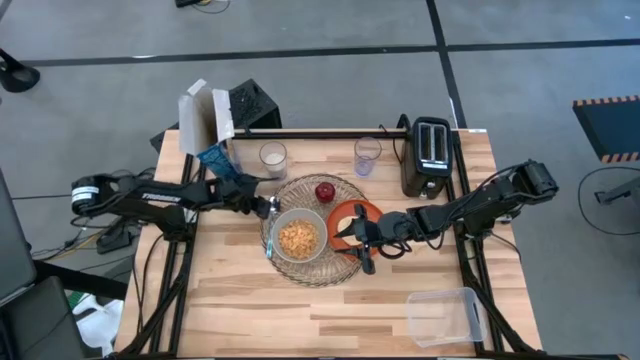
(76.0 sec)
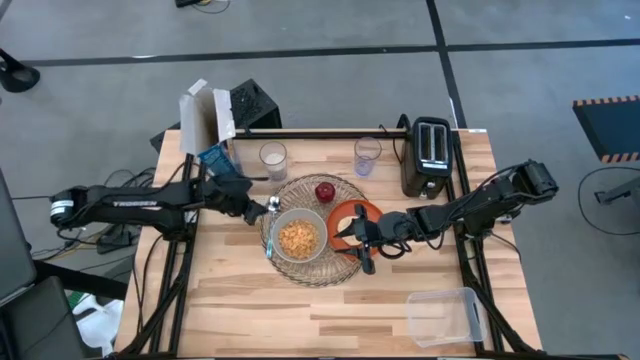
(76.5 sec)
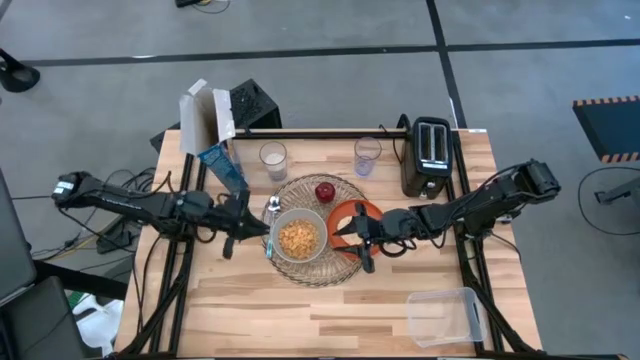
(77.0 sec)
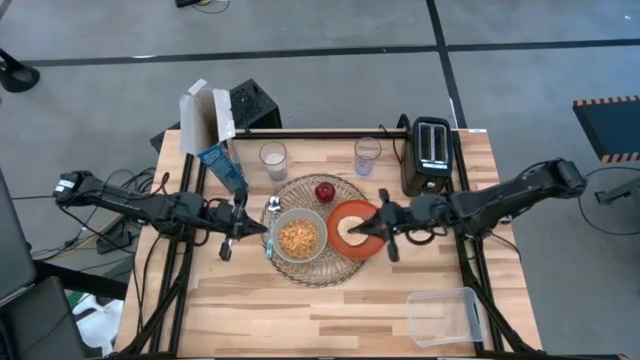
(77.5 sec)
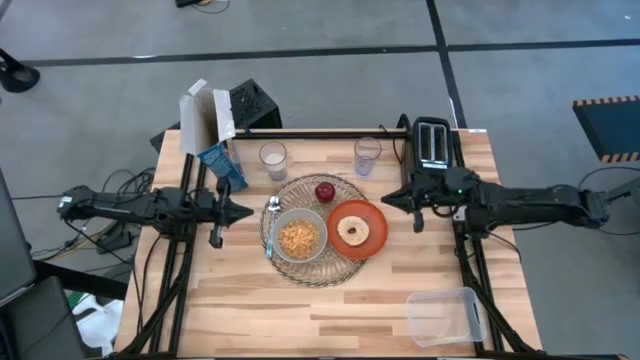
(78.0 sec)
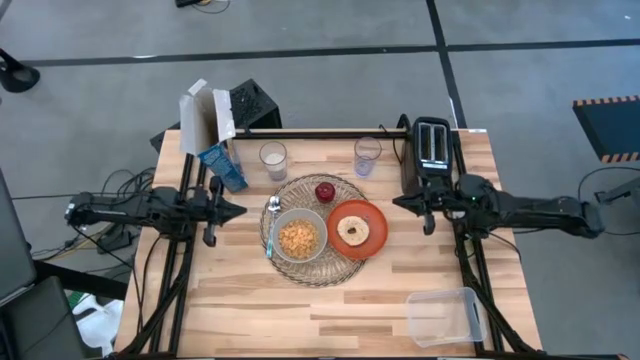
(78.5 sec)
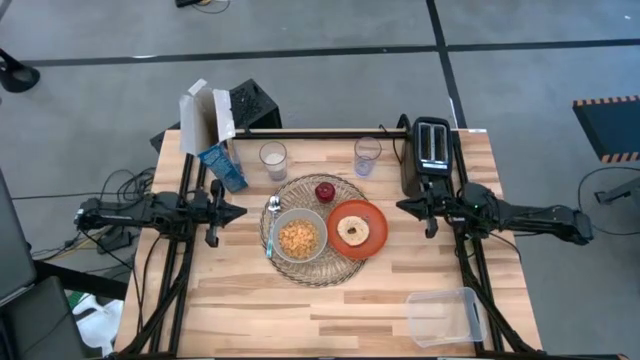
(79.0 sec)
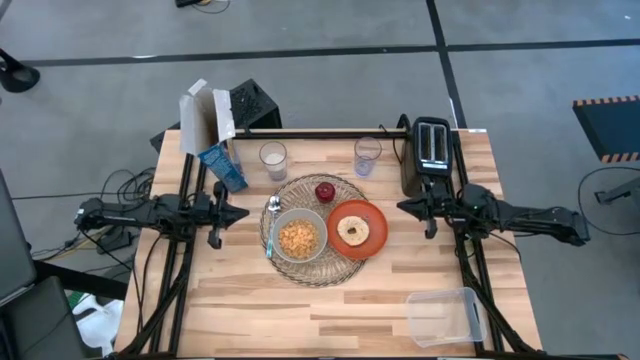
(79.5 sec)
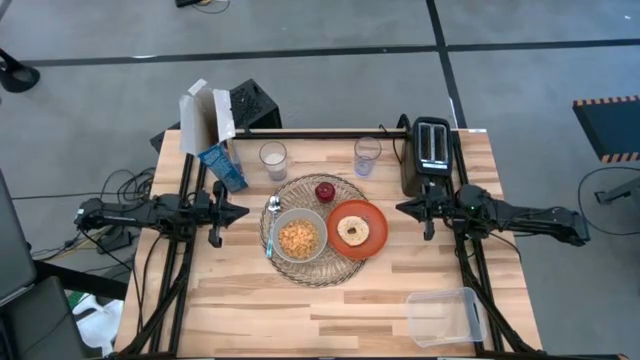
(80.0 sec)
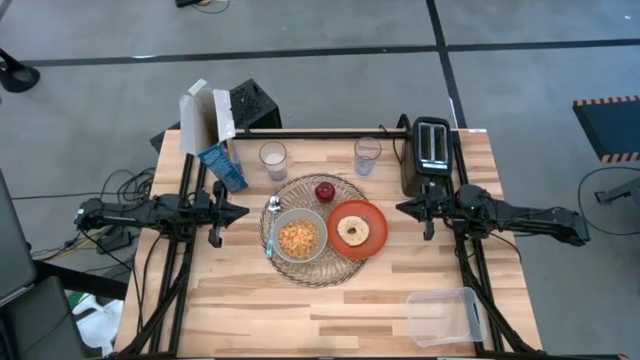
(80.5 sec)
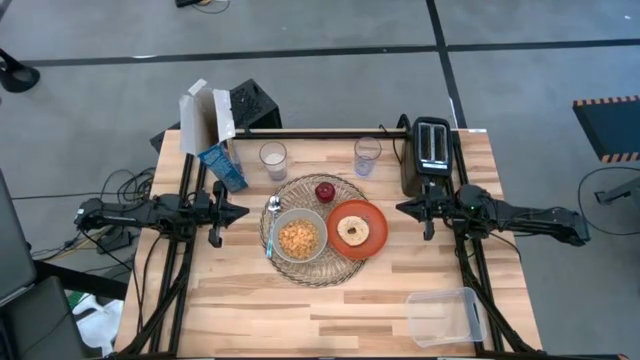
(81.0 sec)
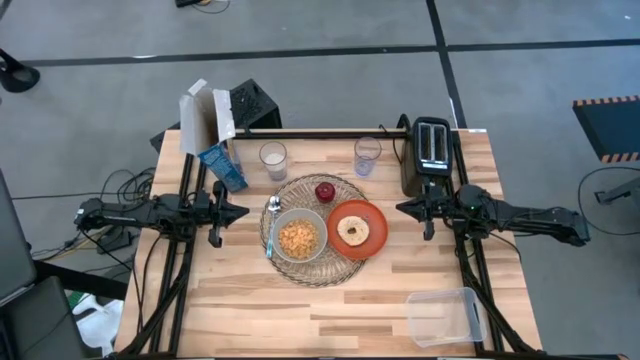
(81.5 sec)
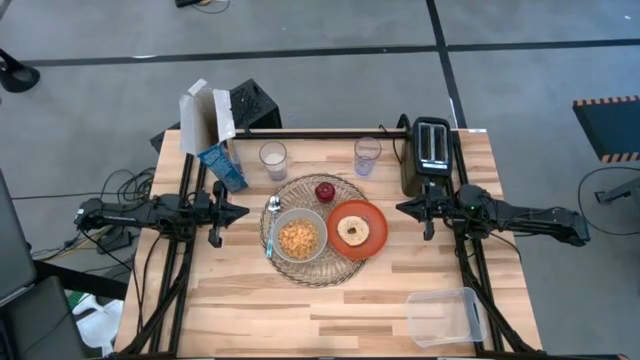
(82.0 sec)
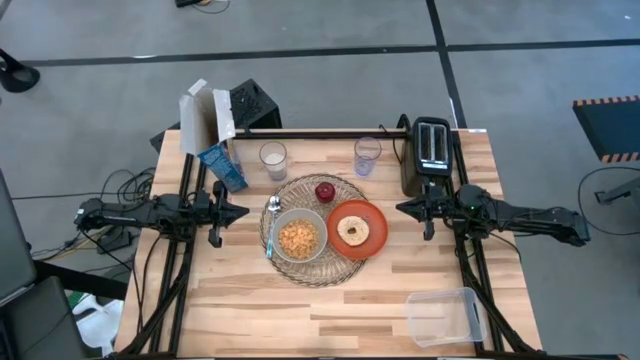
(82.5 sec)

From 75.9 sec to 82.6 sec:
Task: Arrange a breakfast setting
Return to Home Position

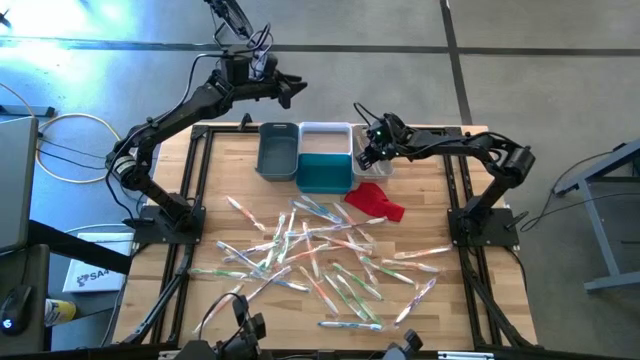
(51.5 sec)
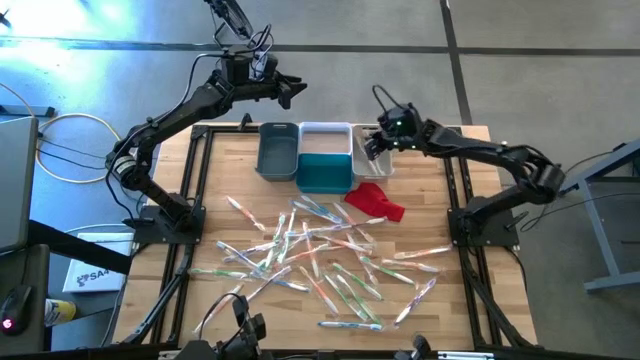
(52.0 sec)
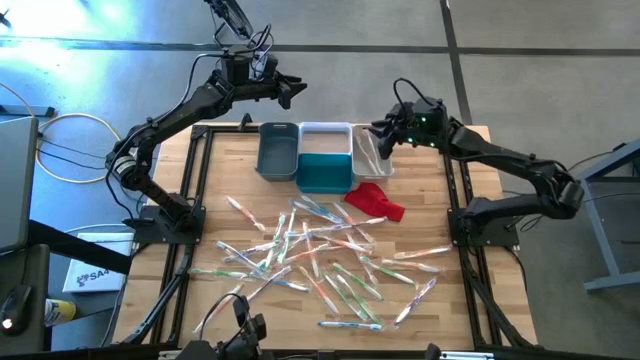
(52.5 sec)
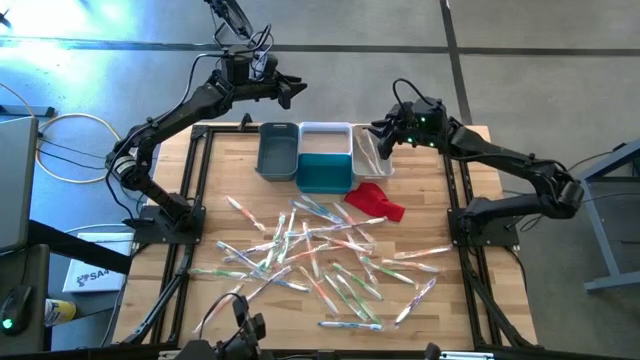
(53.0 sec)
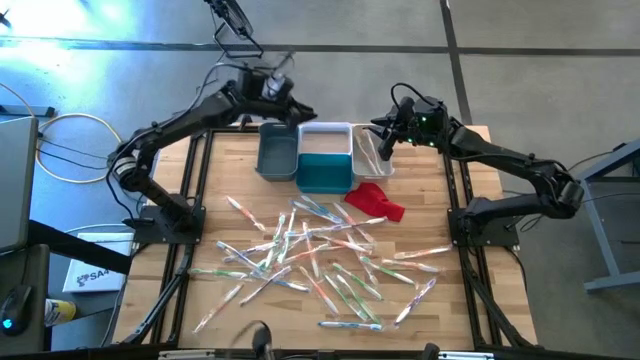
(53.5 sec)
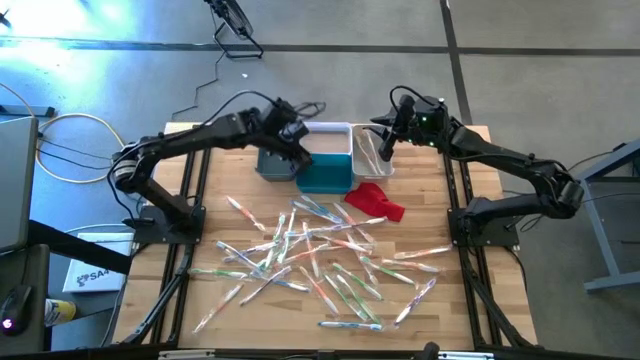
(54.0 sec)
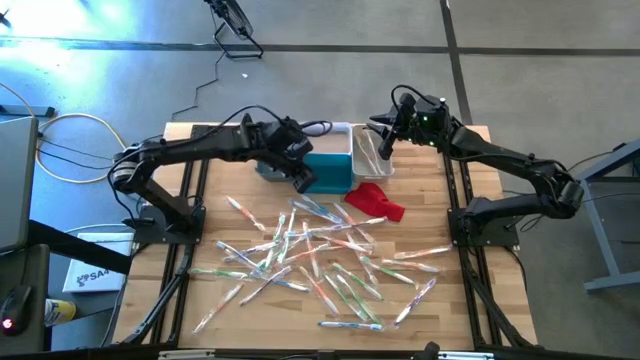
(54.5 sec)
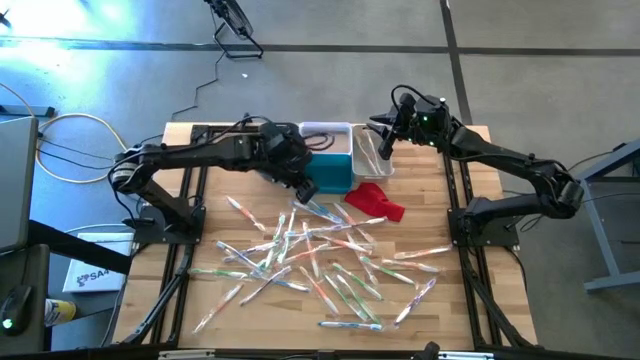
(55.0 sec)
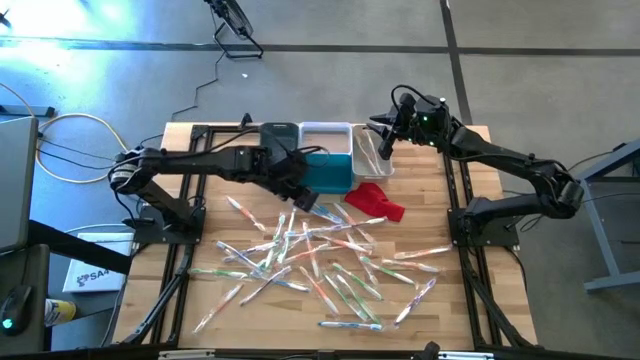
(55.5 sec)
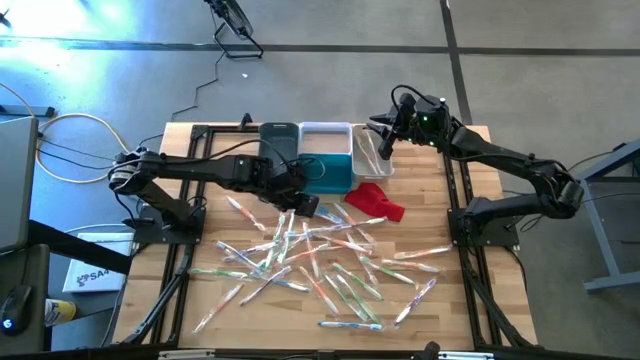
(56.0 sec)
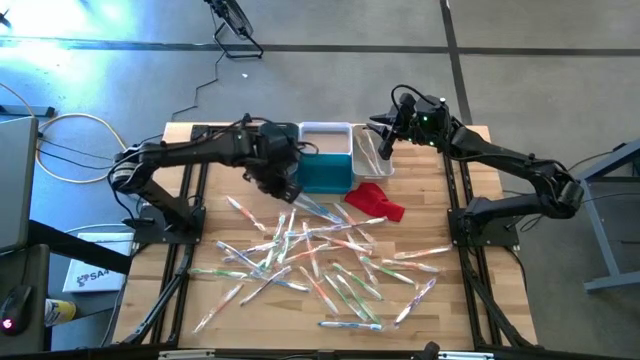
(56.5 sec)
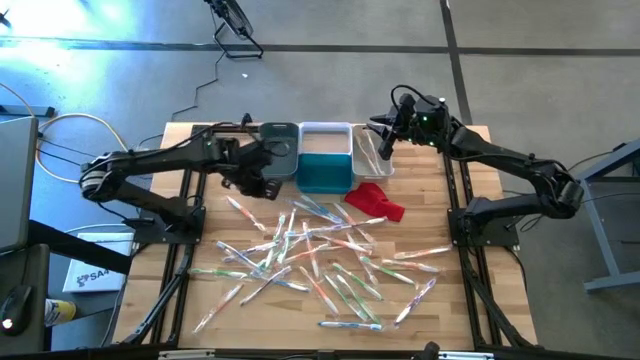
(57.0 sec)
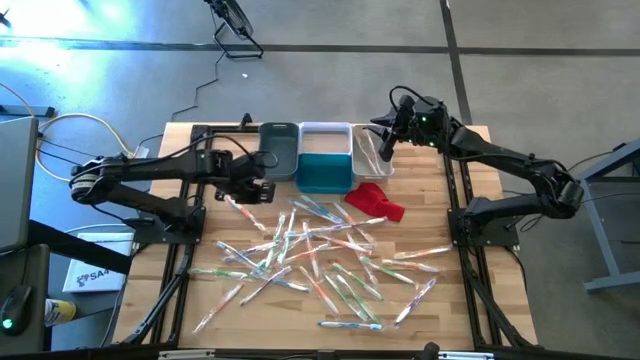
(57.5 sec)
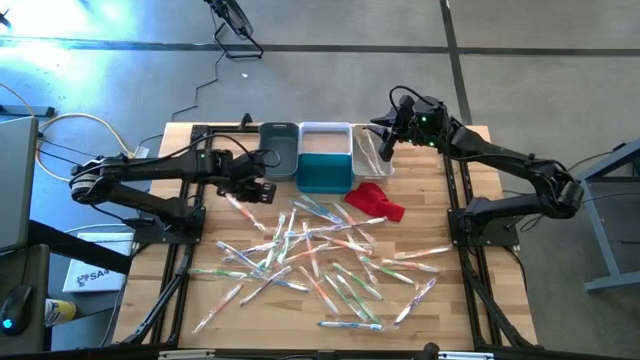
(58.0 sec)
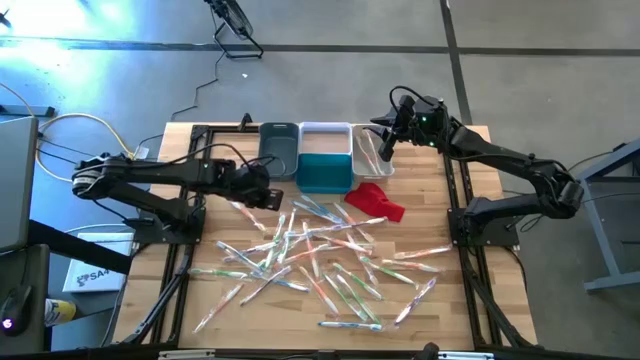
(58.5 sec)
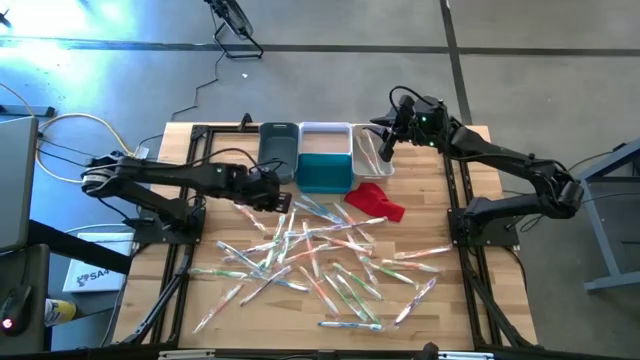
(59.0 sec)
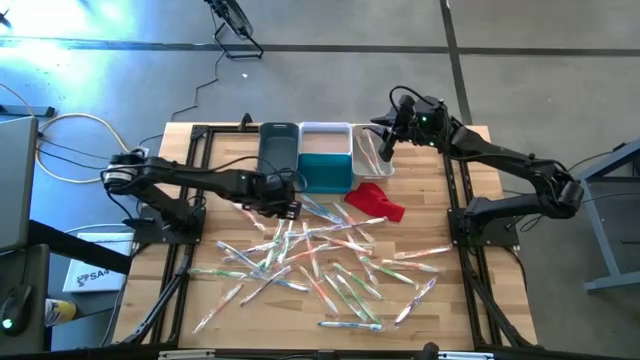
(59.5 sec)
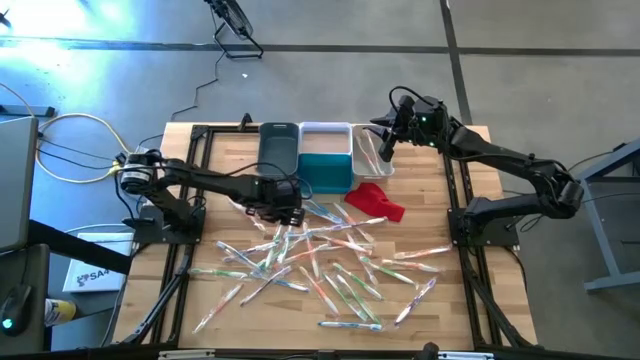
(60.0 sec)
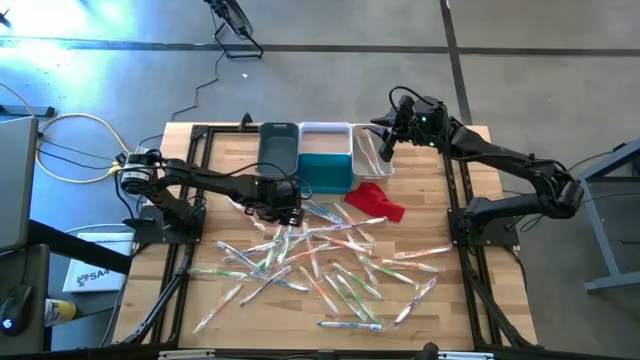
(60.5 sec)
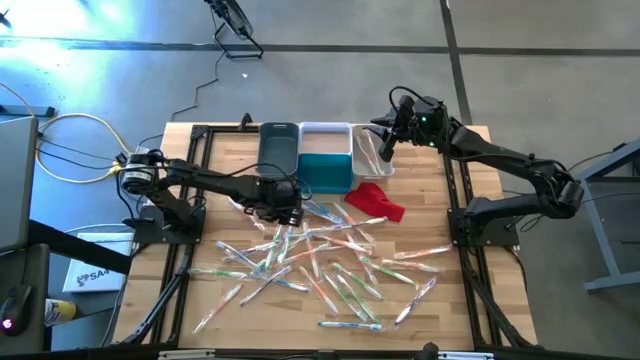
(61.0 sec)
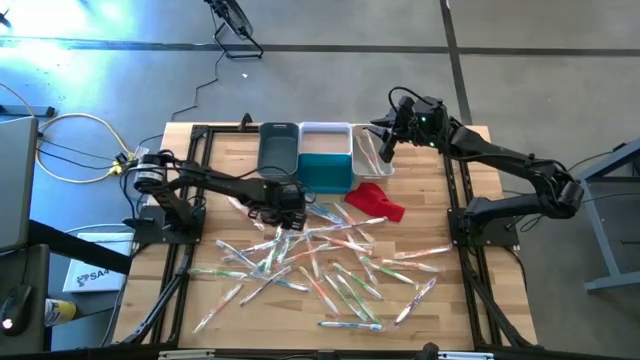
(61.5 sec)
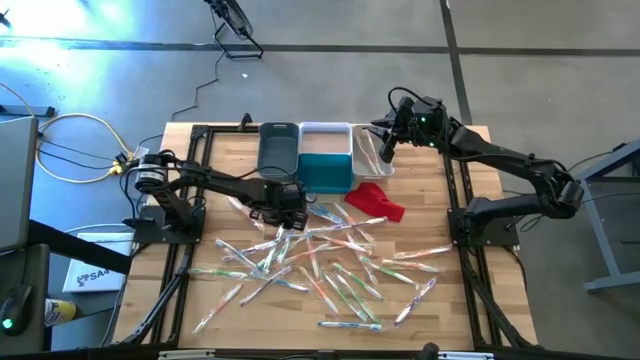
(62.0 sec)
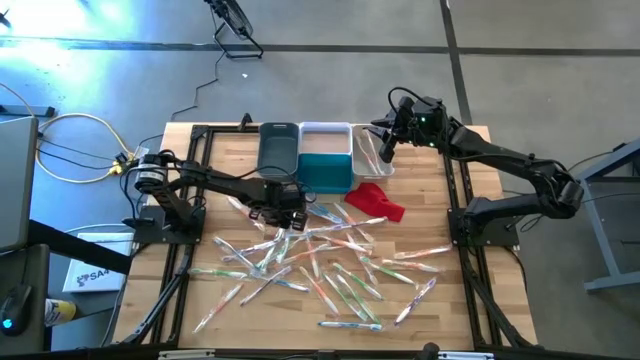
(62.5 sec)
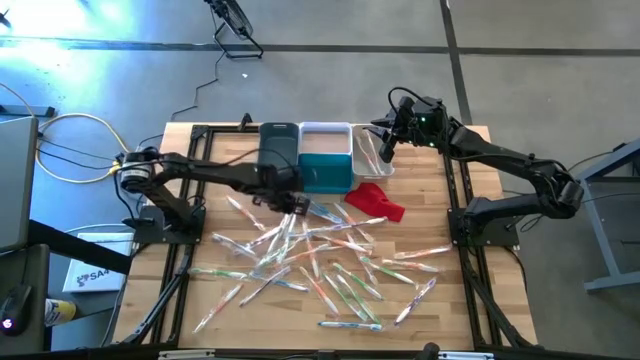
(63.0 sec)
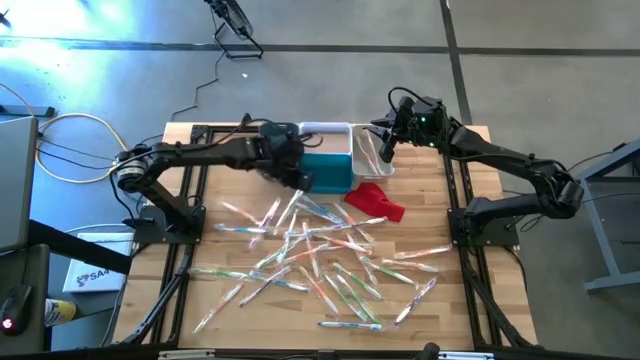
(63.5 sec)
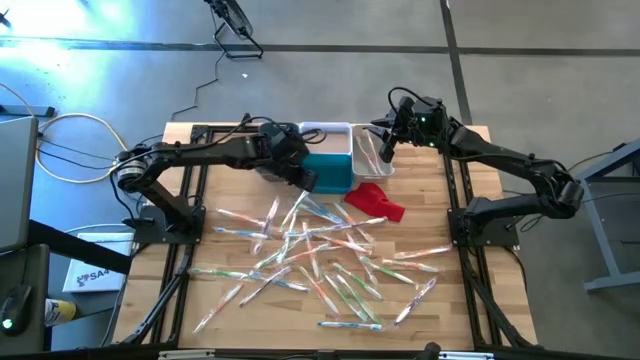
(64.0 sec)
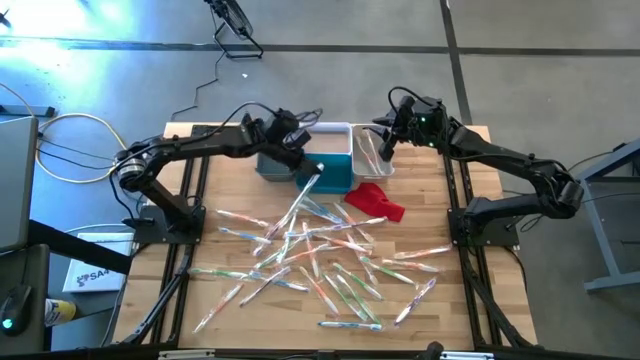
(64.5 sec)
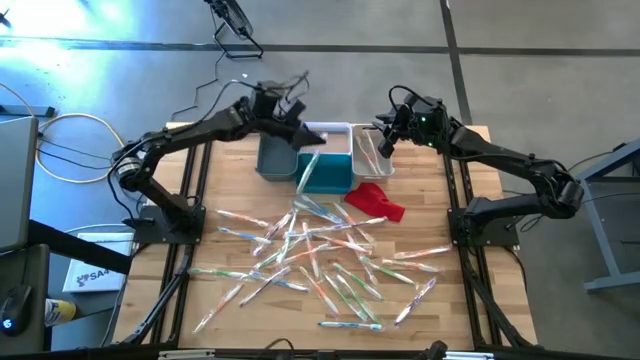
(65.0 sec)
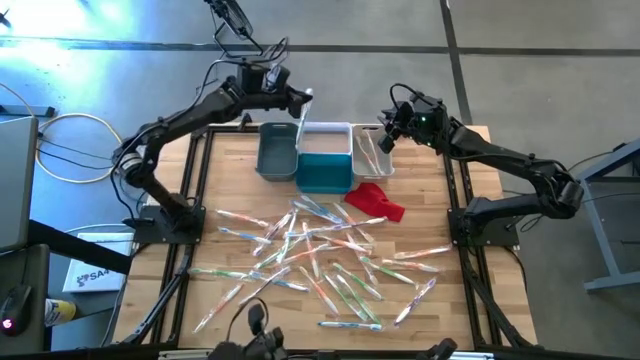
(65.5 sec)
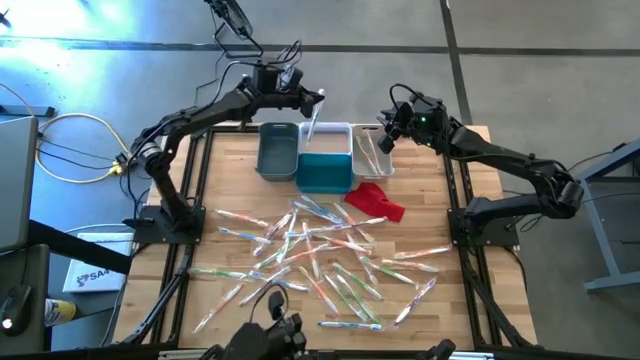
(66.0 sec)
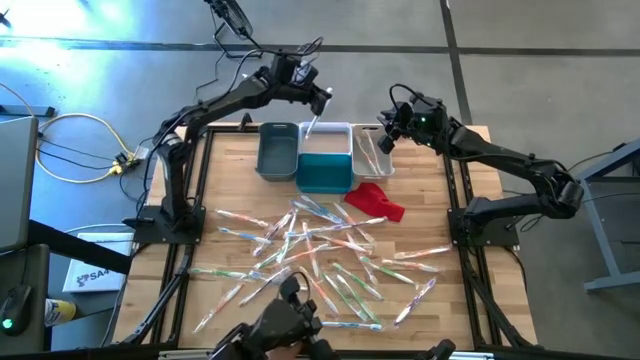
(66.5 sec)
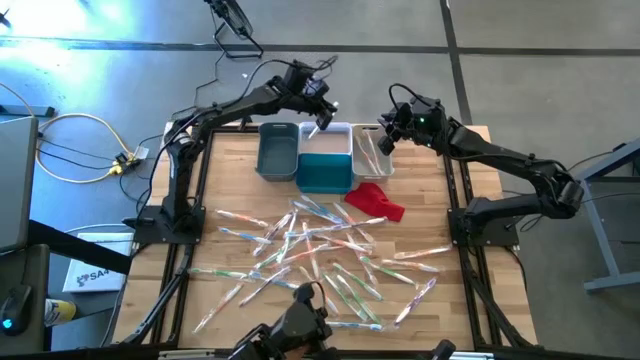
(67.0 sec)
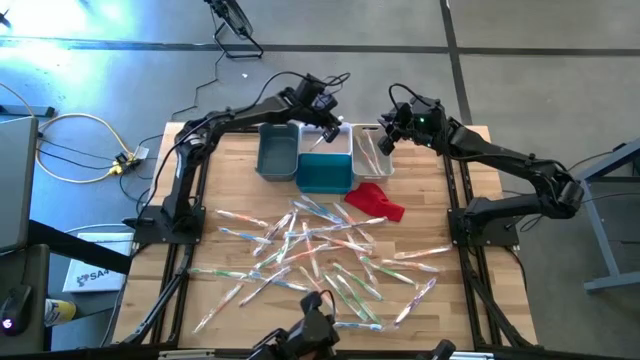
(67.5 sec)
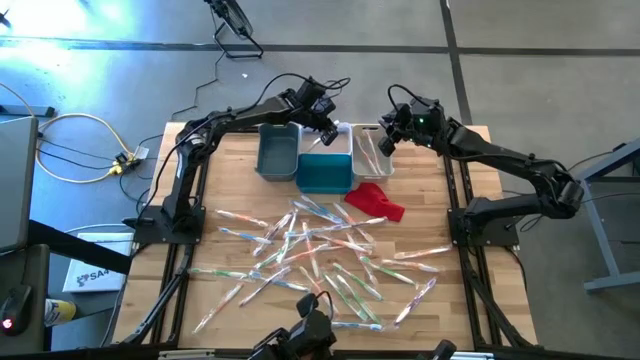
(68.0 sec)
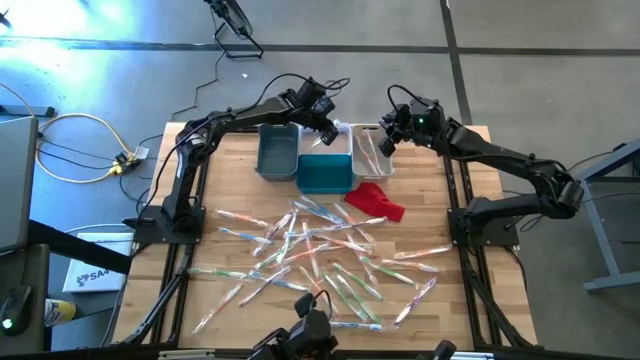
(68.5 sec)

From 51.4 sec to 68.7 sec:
Task: Pick & Place Toothbrushes
Put the green toothbrush into the transparent bin
